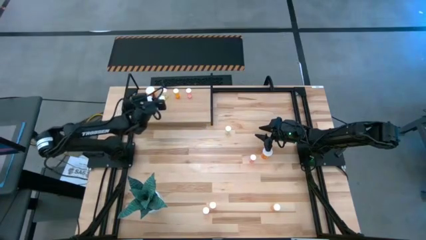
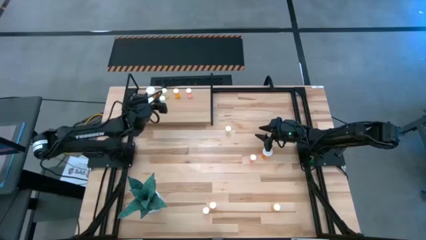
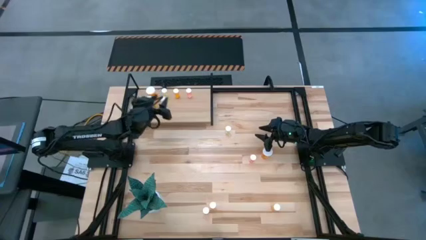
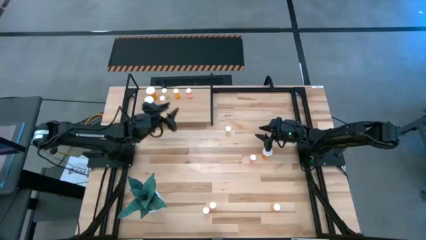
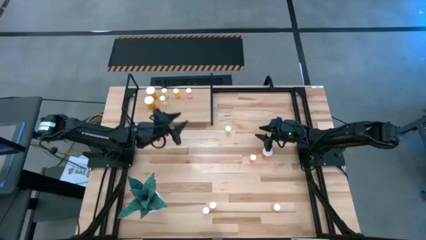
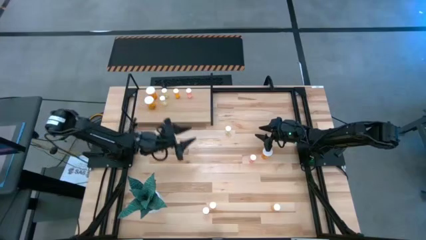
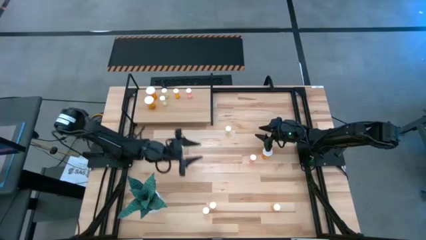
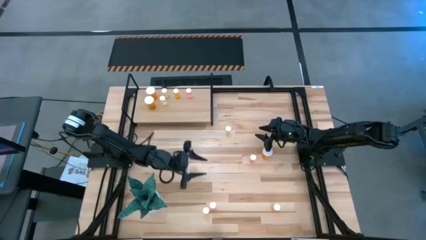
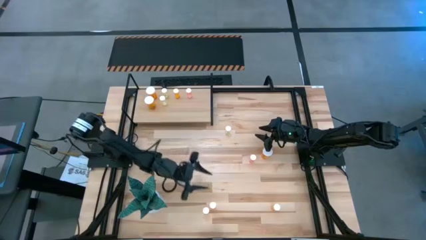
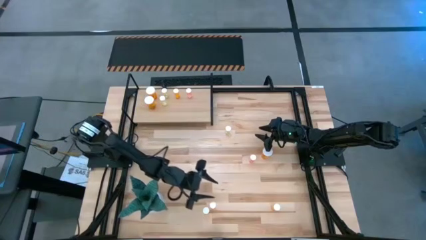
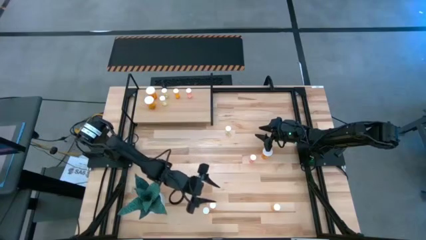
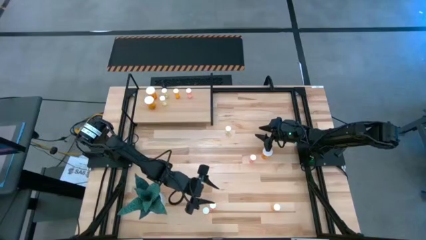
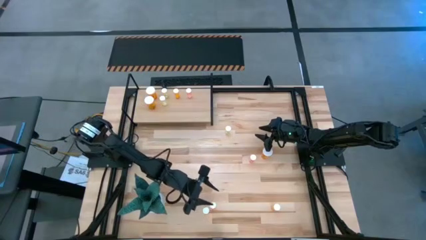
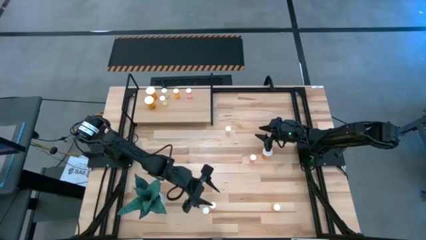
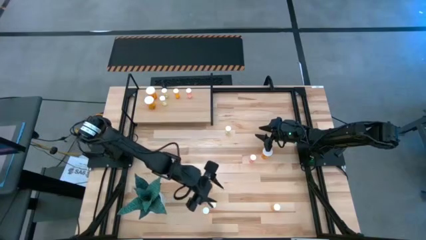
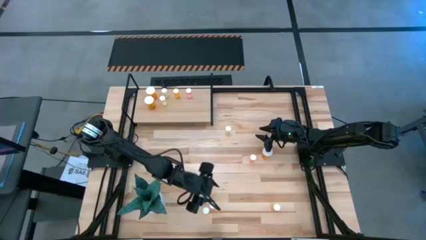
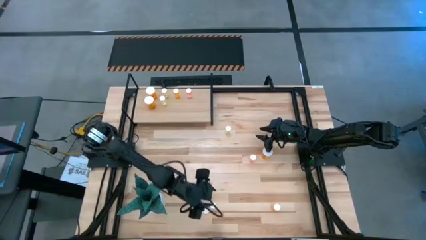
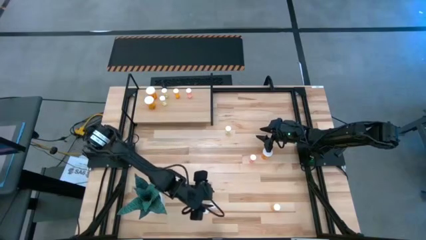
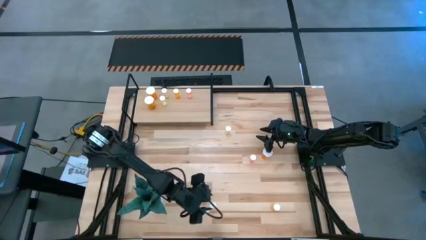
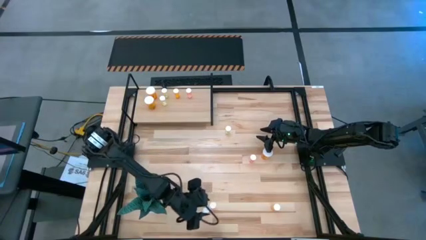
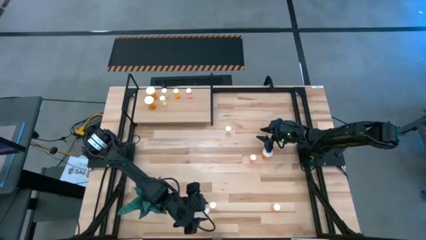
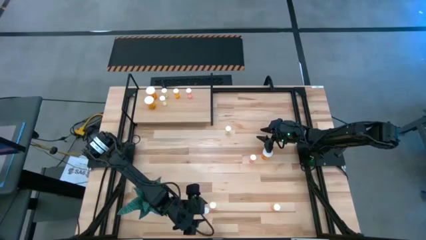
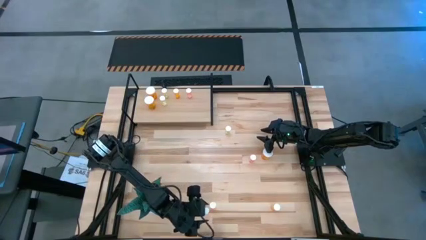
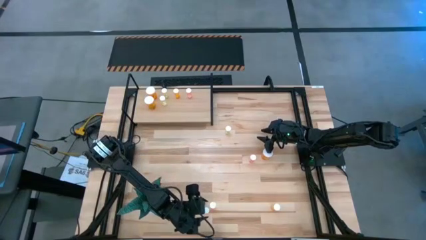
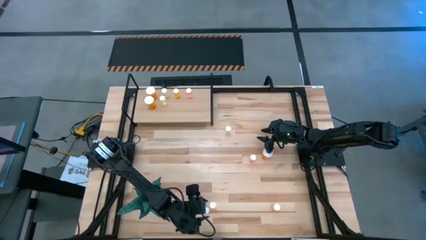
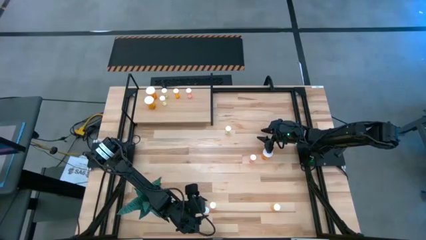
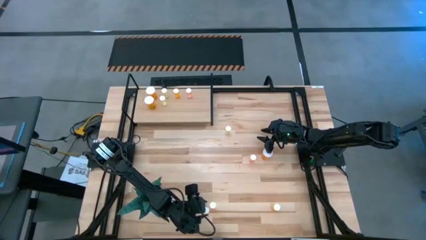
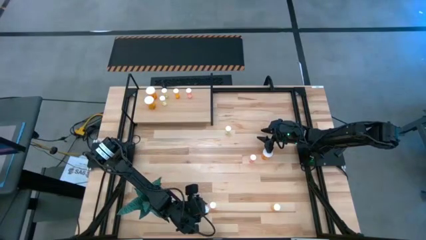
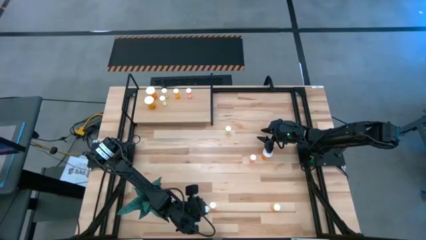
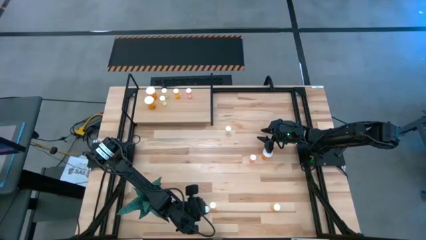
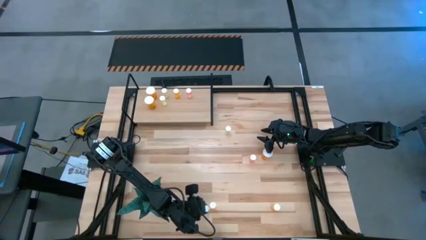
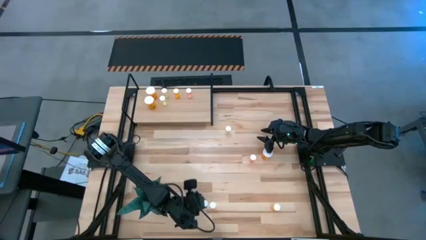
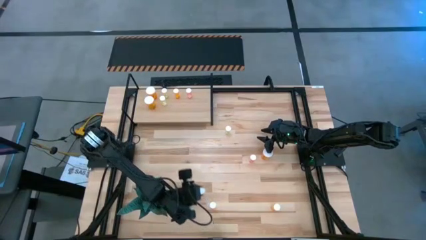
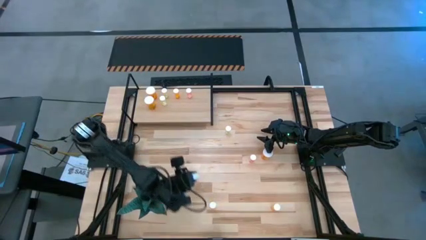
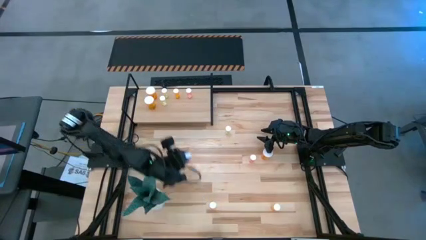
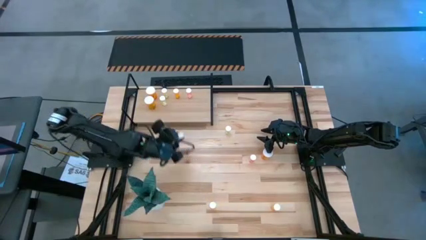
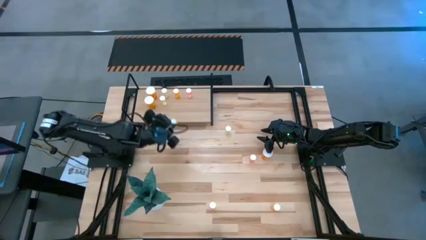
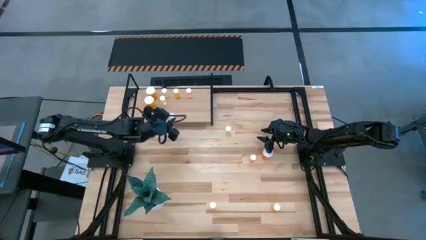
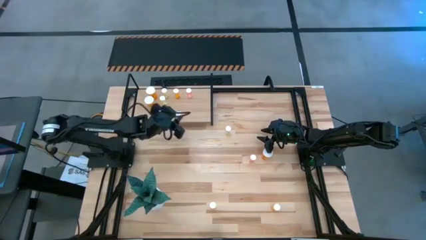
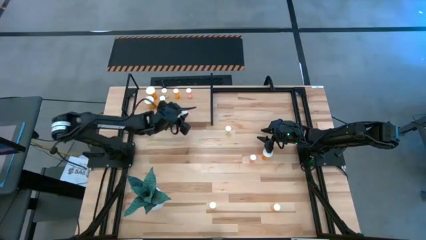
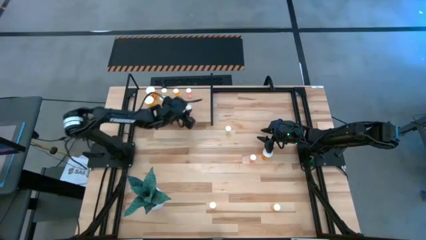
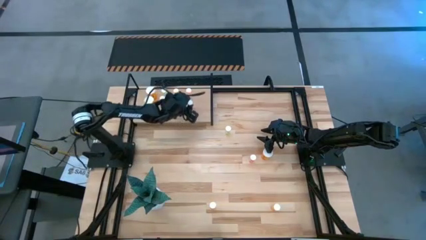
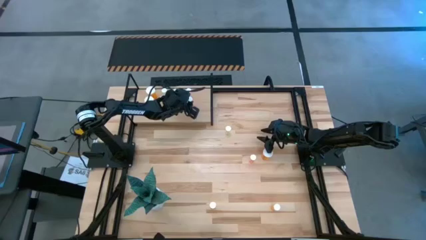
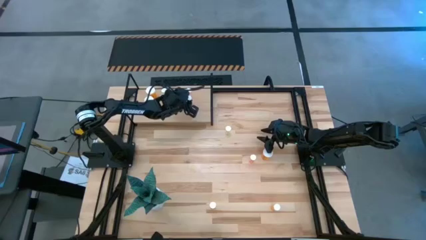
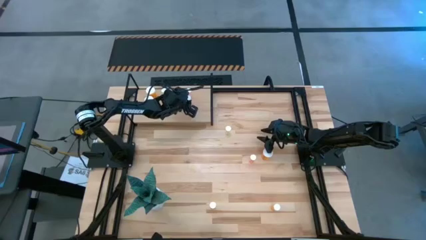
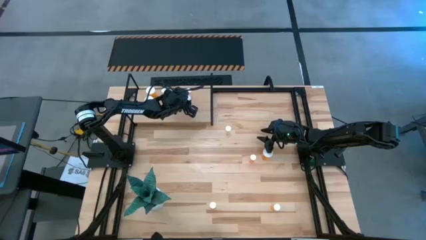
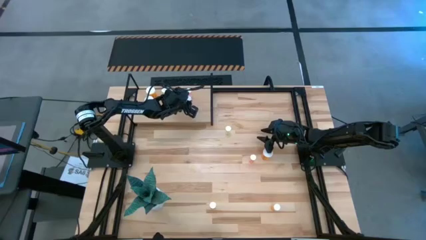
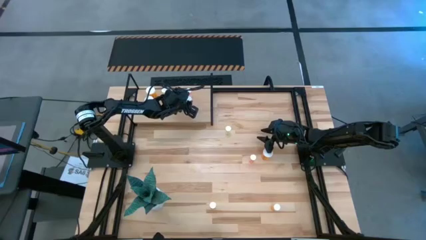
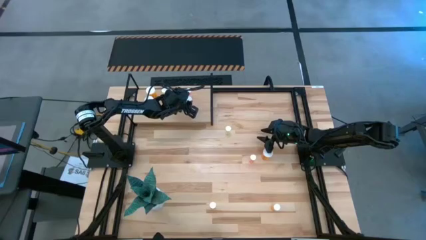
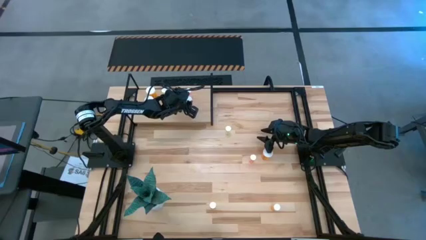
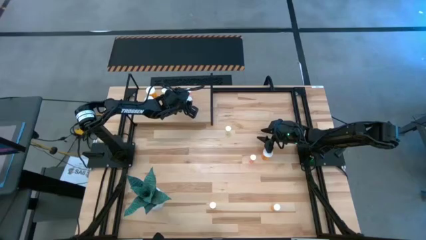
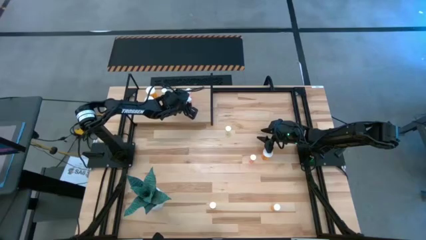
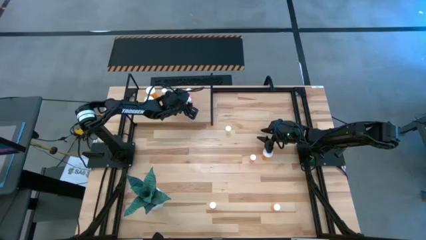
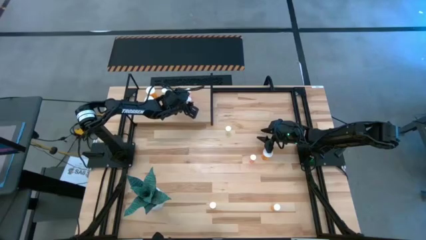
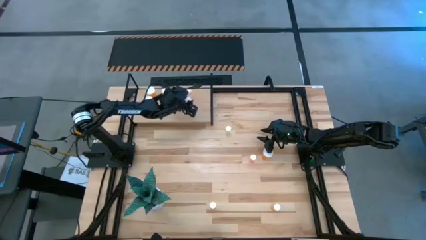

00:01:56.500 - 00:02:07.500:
Task: Pick and place medicine bottles onto shelf by color
Put the bottom pink pill bottle aligned with the other pink pill bottle on the shelf
